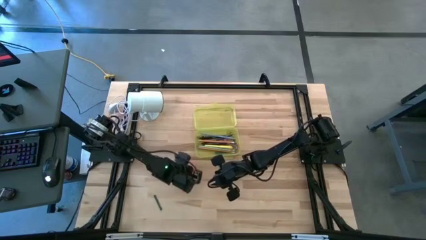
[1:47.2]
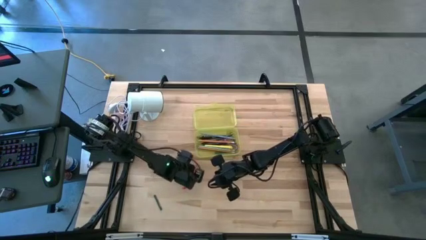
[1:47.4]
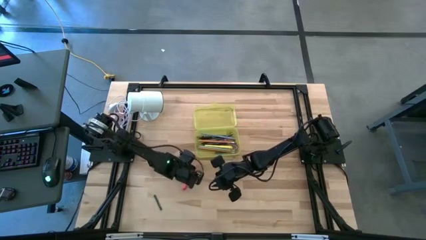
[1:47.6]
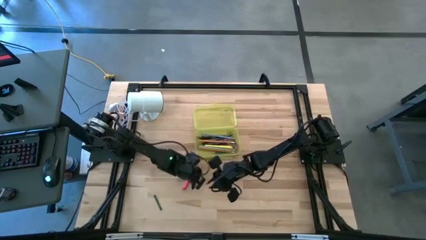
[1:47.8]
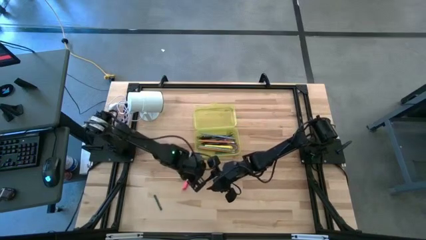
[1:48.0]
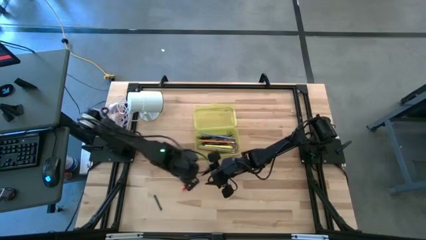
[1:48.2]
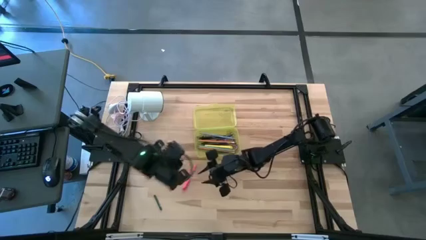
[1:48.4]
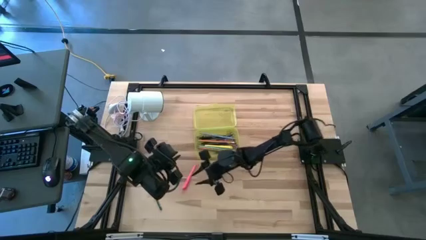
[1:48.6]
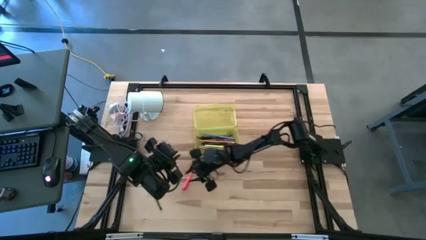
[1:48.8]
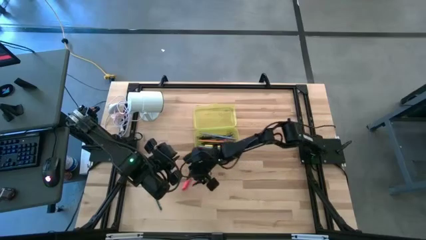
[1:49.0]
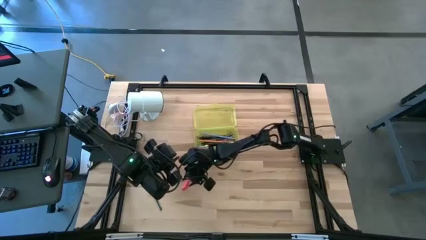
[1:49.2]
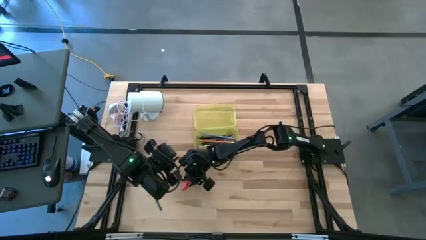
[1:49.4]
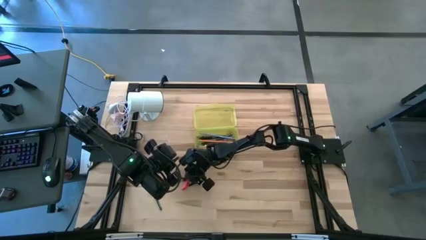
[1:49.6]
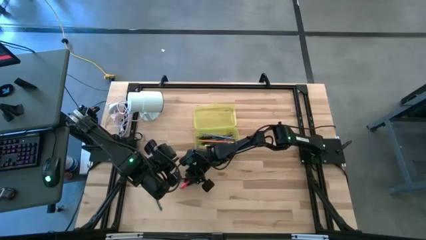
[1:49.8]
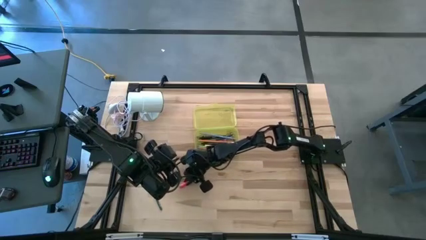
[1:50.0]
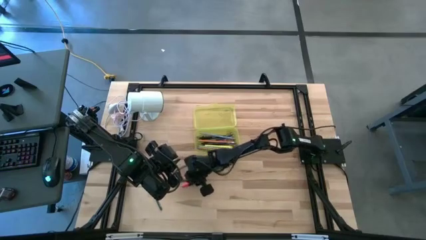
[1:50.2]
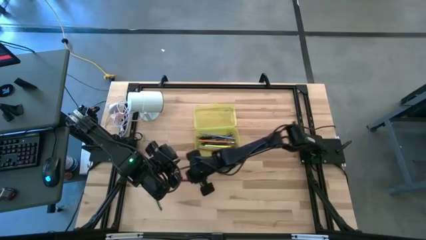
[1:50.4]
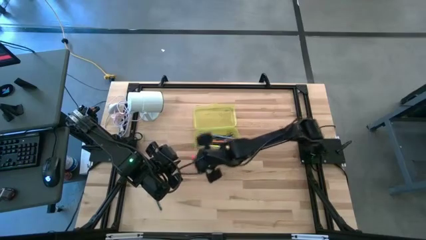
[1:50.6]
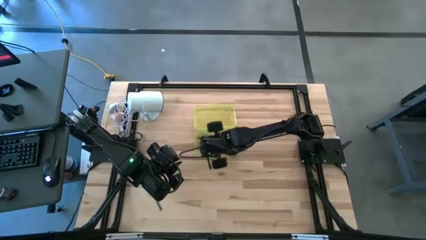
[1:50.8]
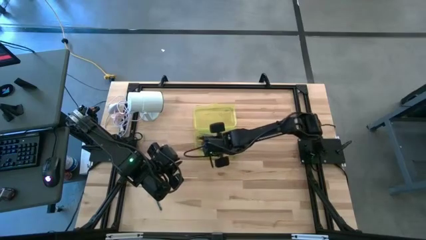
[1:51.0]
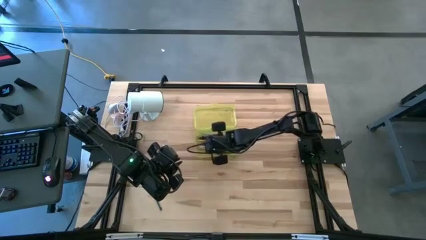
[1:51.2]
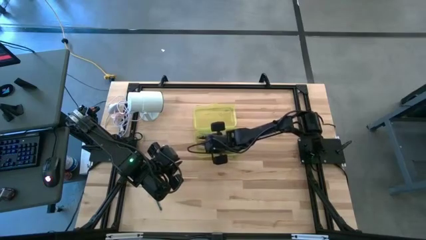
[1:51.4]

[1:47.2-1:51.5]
Task: Pick & place school supplies into a supply box
Put the pink pen into the supply box

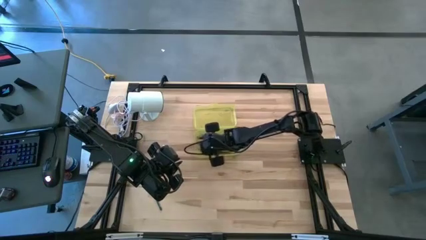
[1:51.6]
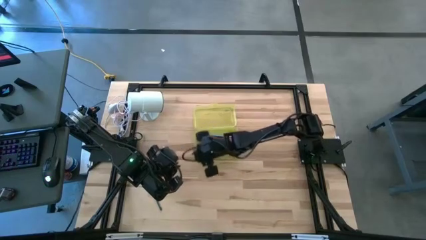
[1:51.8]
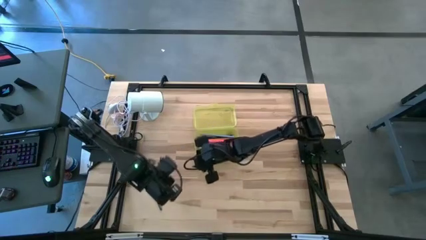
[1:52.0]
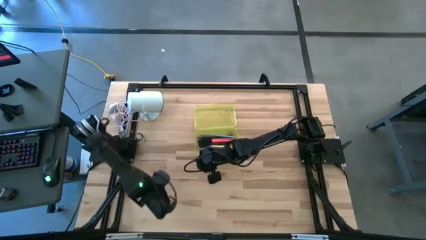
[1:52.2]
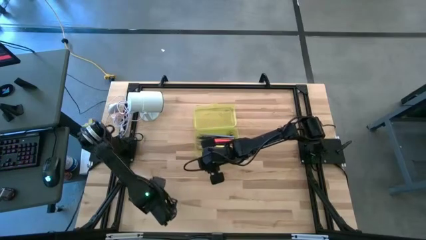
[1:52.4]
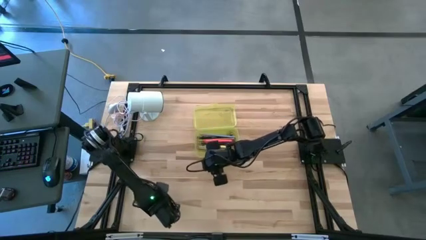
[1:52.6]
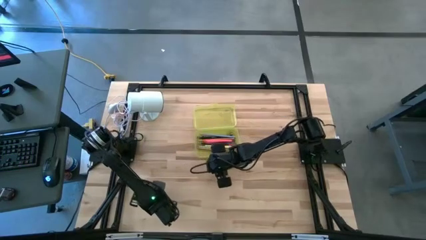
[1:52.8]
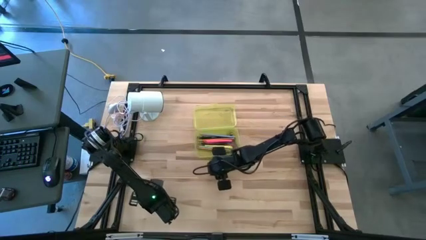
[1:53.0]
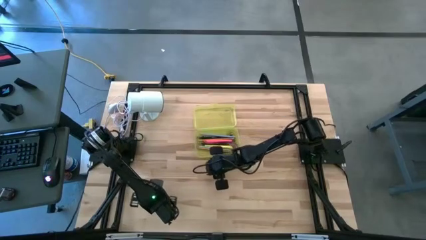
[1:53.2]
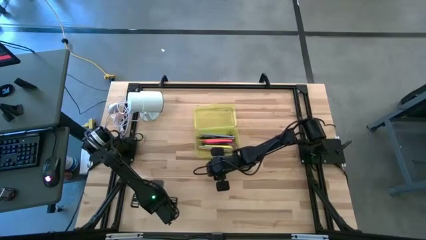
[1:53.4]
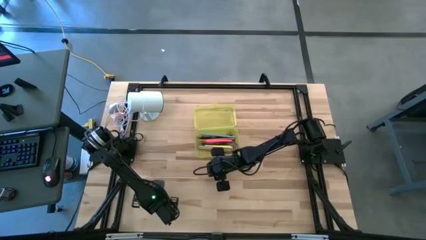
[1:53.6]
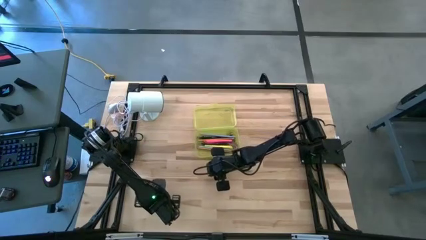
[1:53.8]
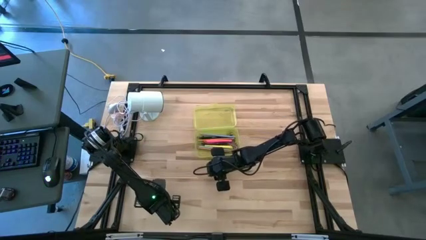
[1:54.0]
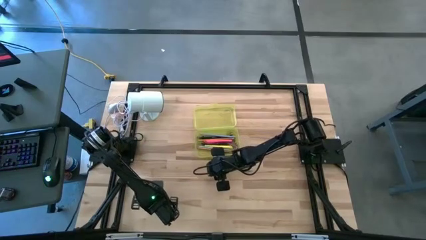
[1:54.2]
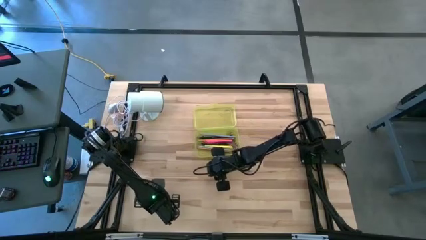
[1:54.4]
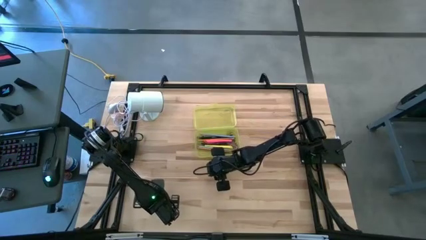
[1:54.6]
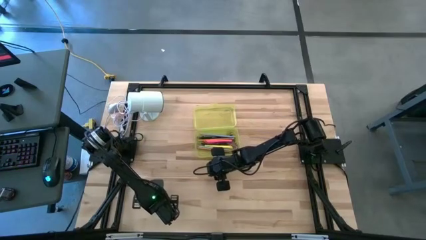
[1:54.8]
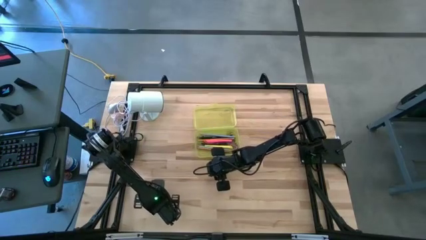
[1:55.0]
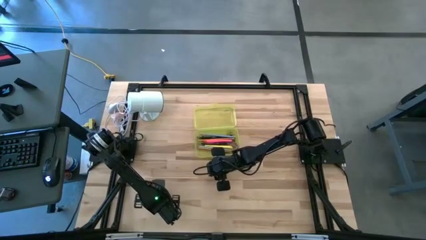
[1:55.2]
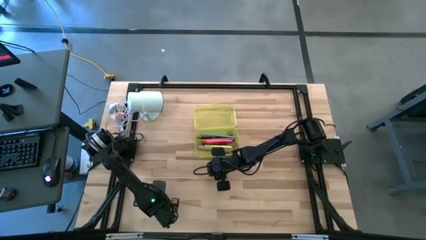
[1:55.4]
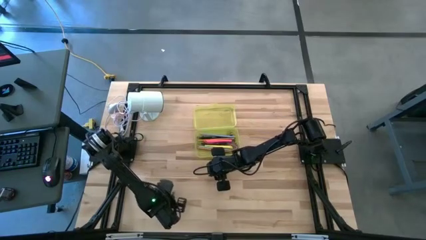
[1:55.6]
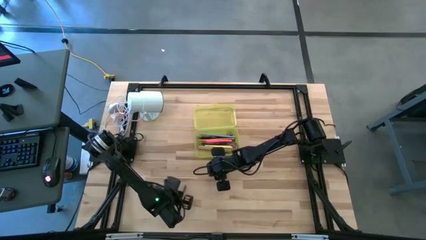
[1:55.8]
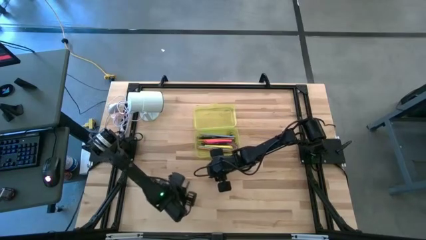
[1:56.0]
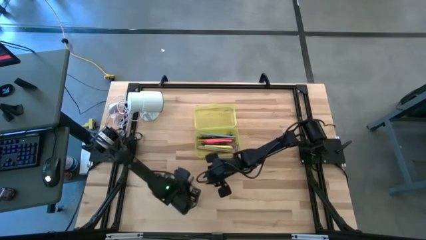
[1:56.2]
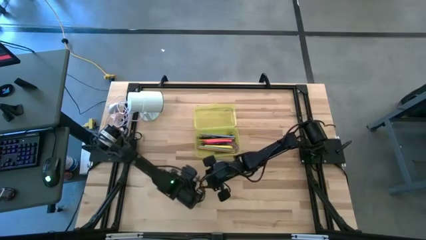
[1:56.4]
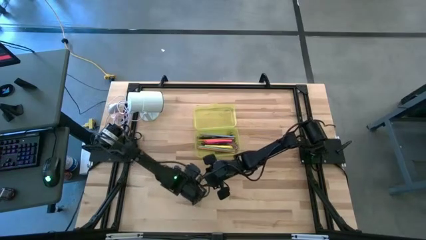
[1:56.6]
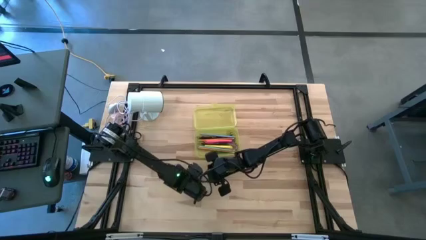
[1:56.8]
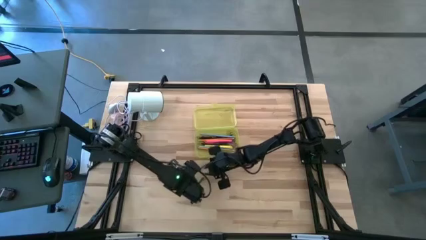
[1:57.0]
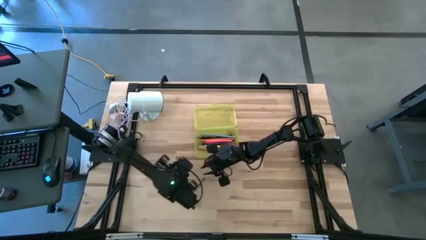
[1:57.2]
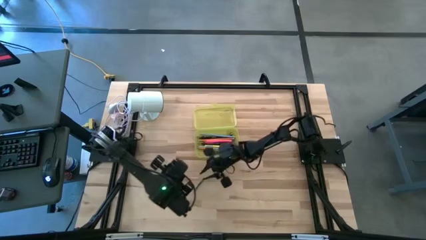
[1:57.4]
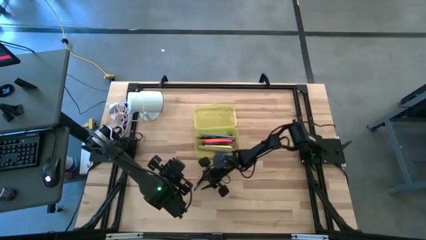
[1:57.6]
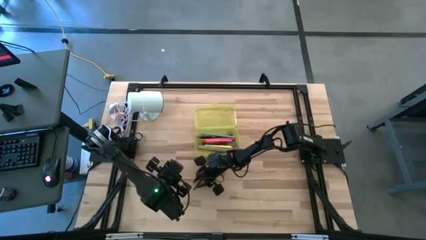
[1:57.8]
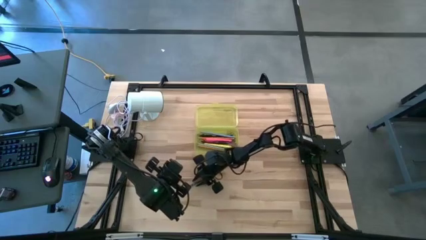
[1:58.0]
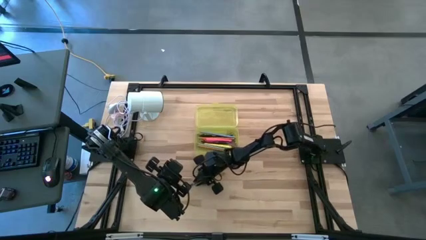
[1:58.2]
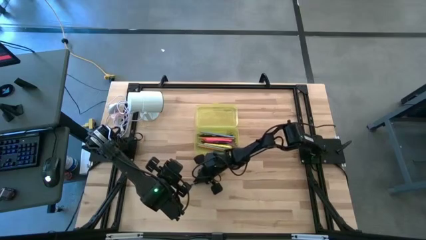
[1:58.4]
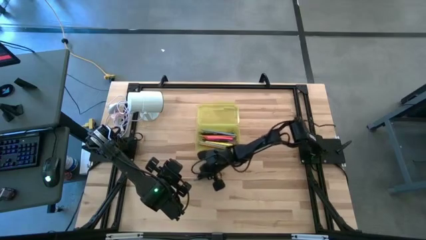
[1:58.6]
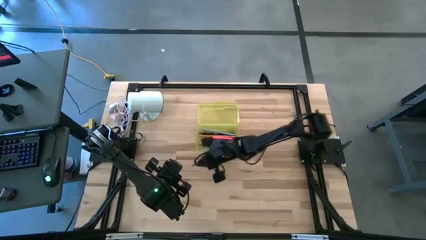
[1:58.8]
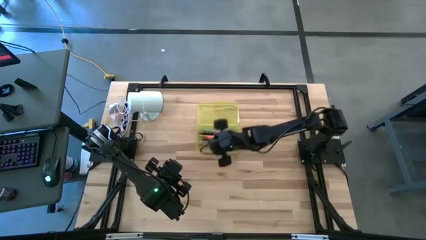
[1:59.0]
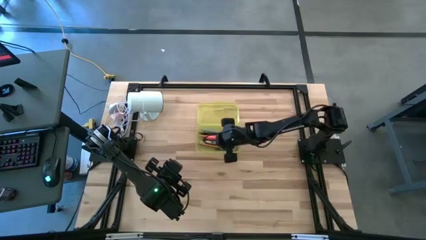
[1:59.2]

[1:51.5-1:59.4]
Put the dark green crayon into the supply box

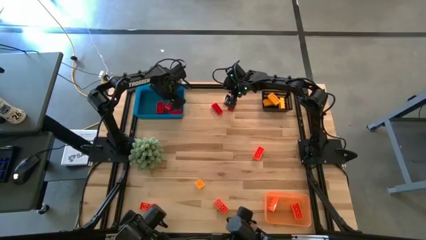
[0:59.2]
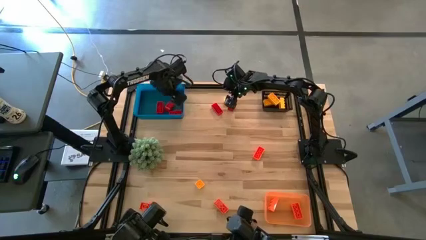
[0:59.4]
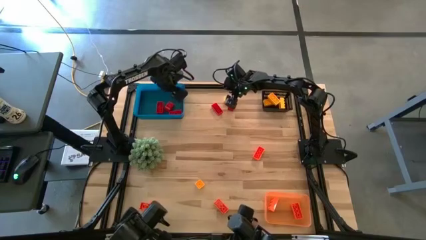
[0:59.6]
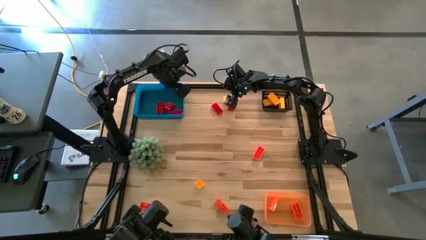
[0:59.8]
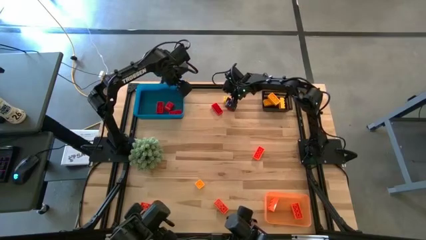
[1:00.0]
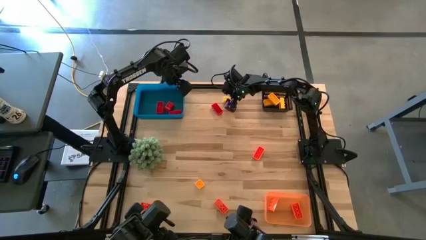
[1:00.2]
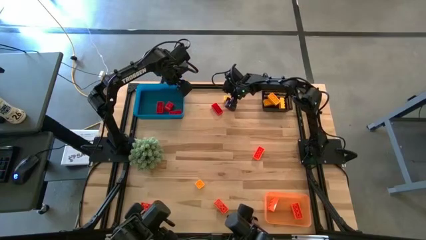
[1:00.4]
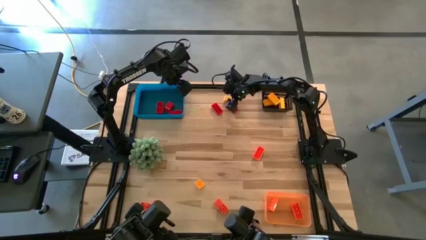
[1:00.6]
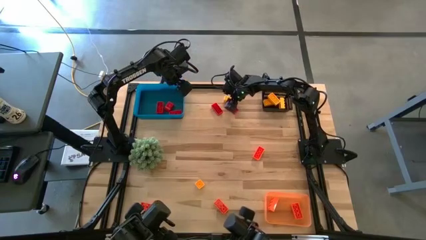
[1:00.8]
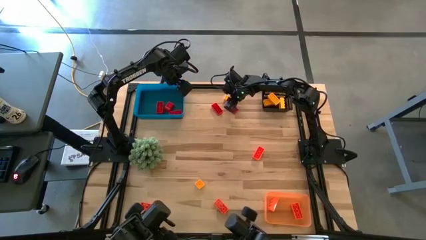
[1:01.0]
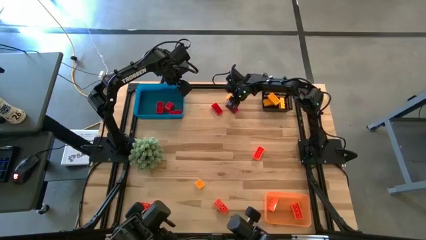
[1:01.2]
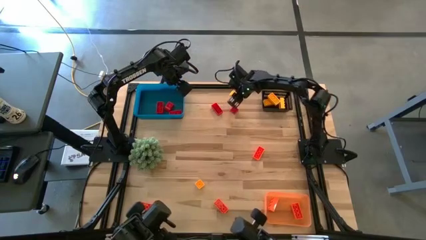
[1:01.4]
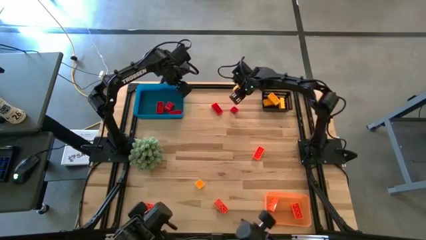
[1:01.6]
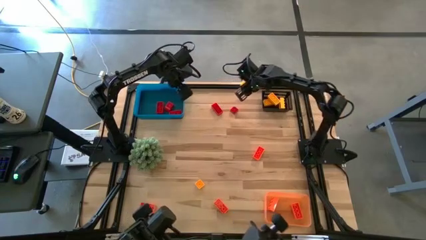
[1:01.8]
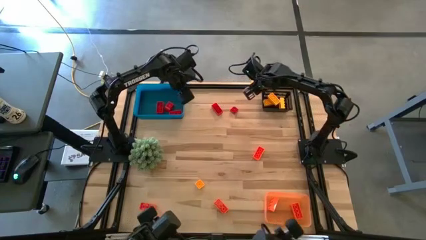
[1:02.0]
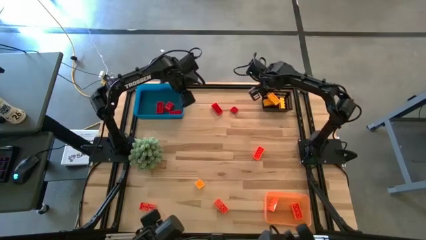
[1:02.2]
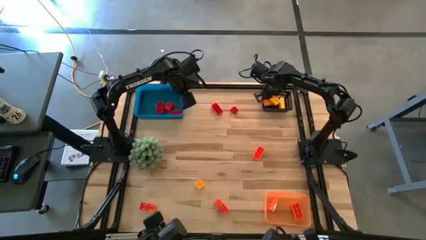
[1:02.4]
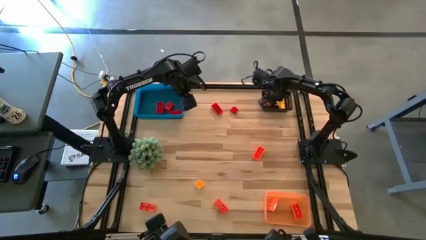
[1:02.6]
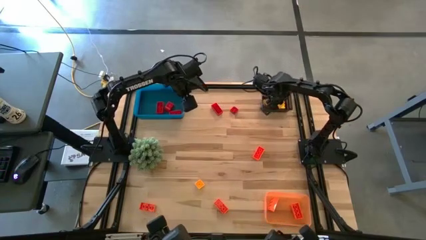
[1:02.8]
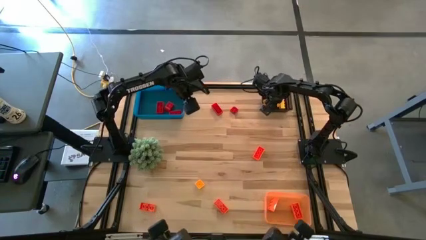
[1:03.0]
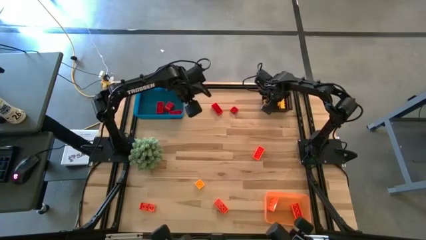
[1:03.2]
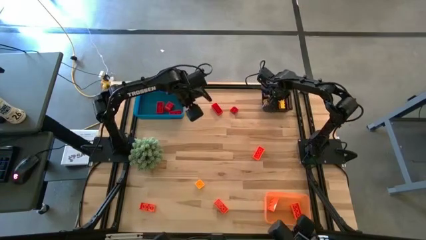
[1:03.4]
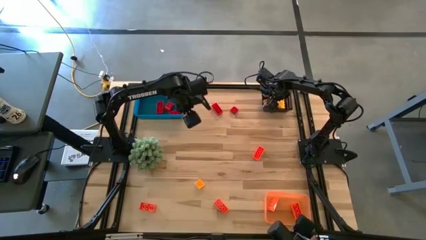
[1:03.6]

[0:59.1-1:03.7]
Task: Sort & place blocks by color
Put the yellow game piece into the black bin
